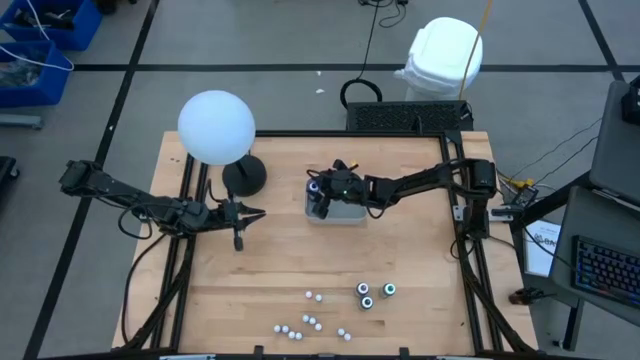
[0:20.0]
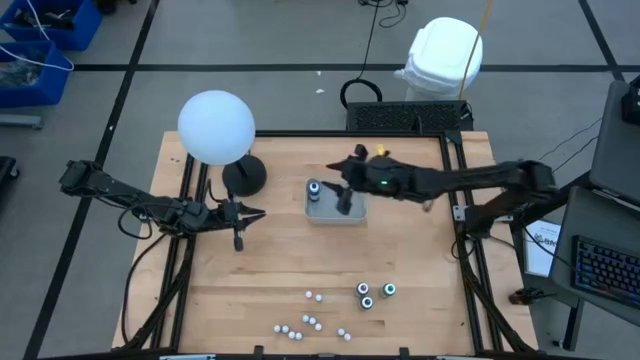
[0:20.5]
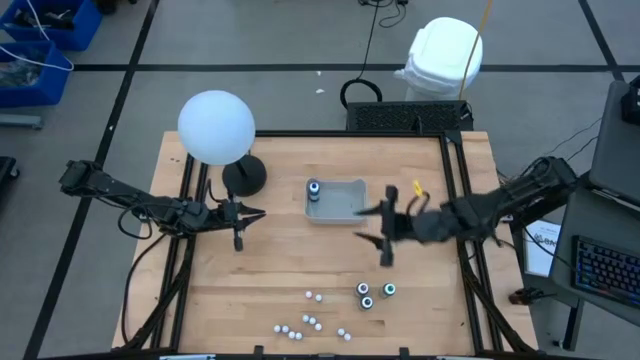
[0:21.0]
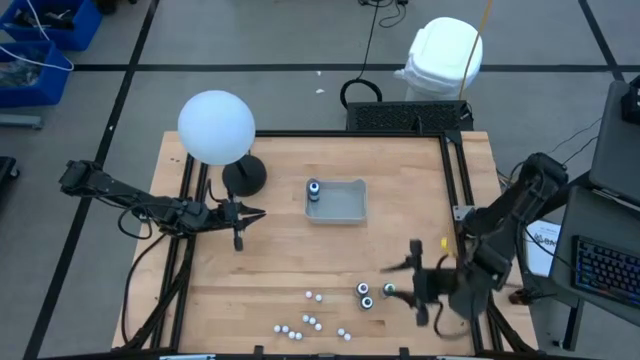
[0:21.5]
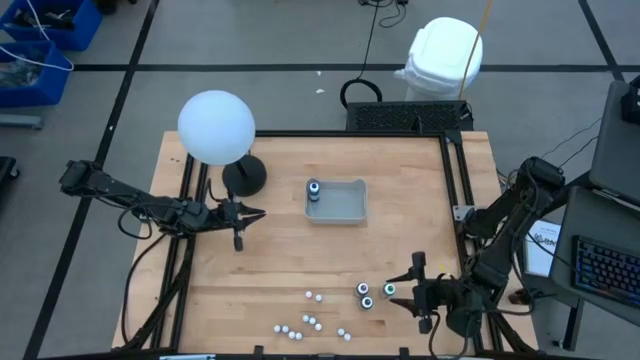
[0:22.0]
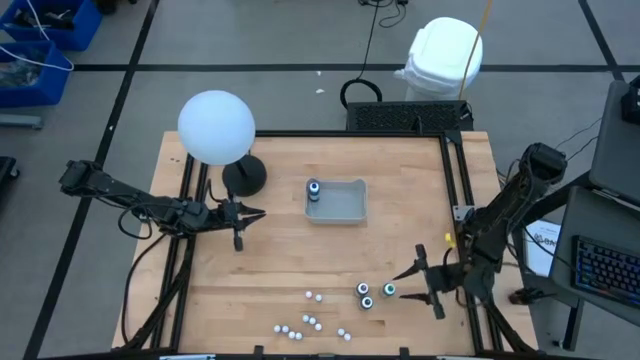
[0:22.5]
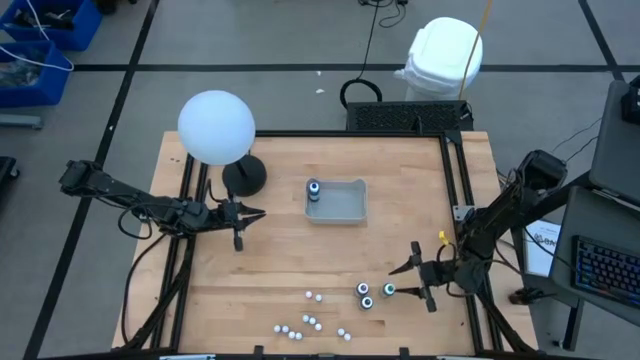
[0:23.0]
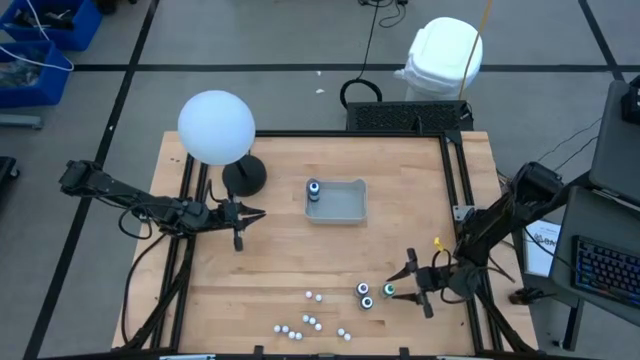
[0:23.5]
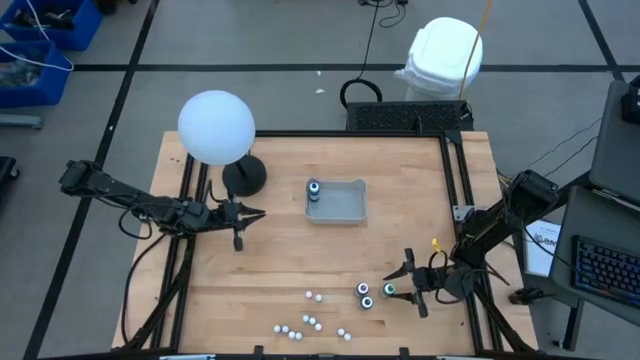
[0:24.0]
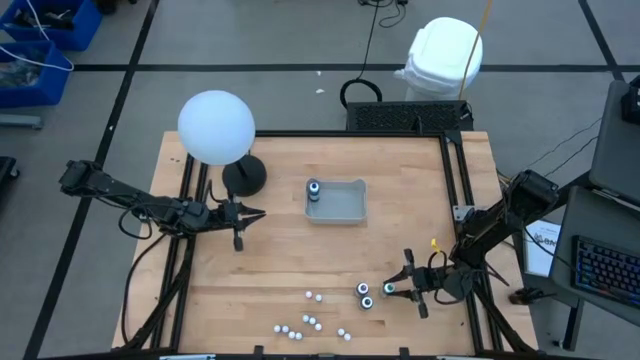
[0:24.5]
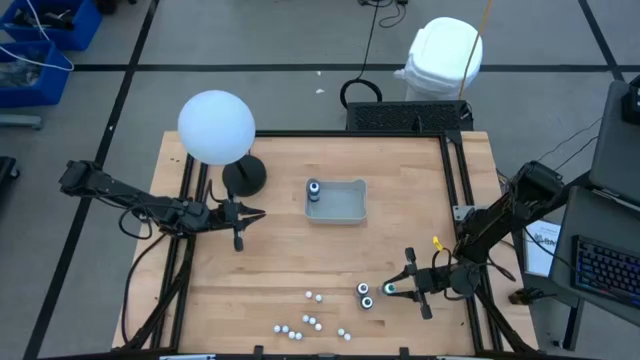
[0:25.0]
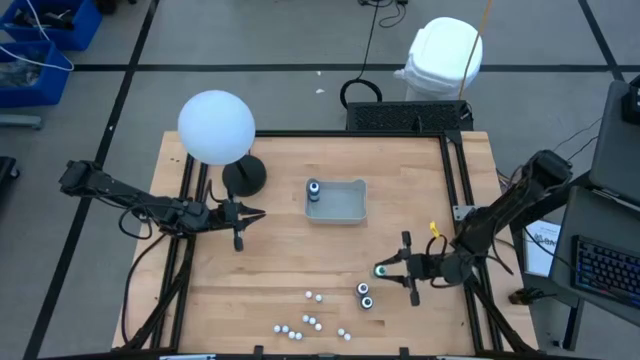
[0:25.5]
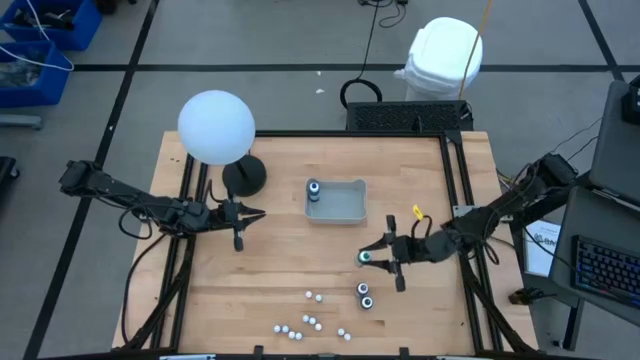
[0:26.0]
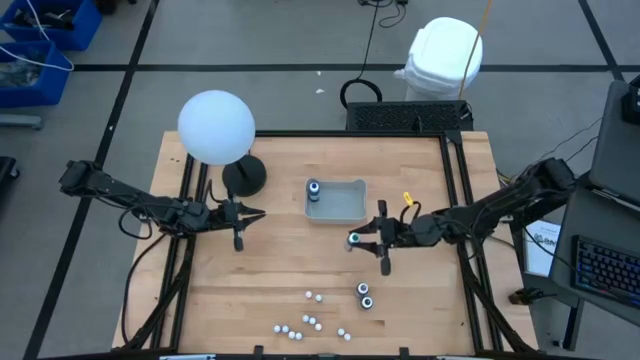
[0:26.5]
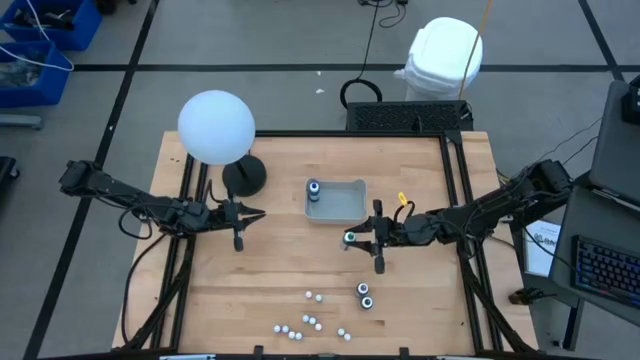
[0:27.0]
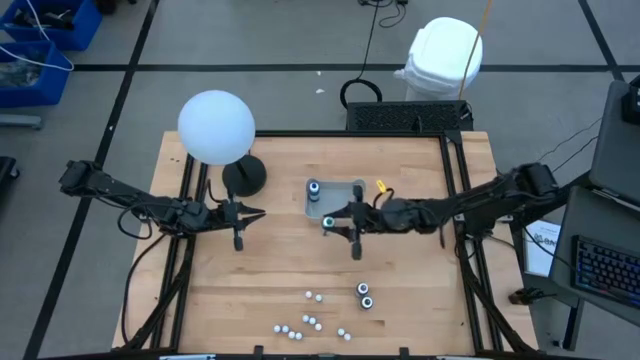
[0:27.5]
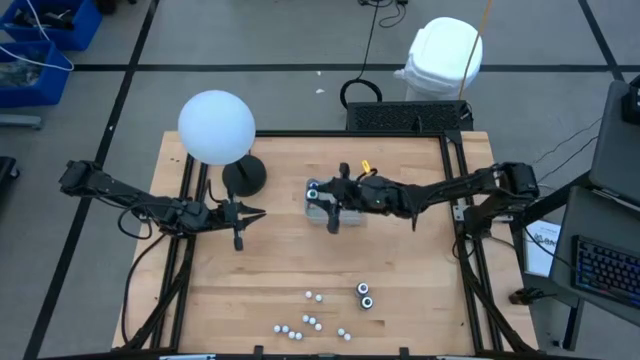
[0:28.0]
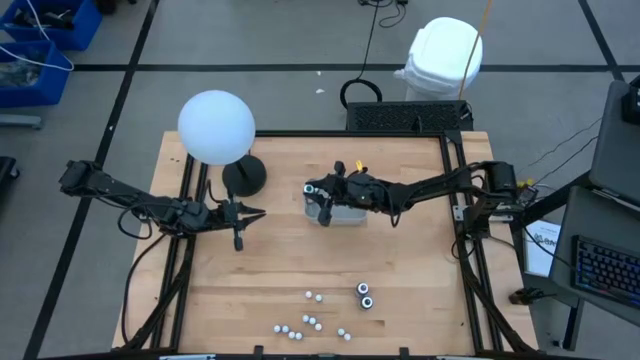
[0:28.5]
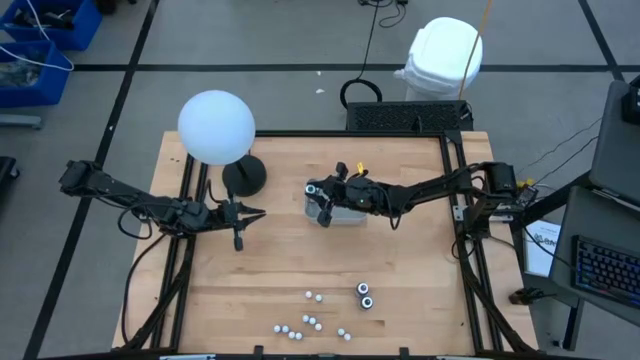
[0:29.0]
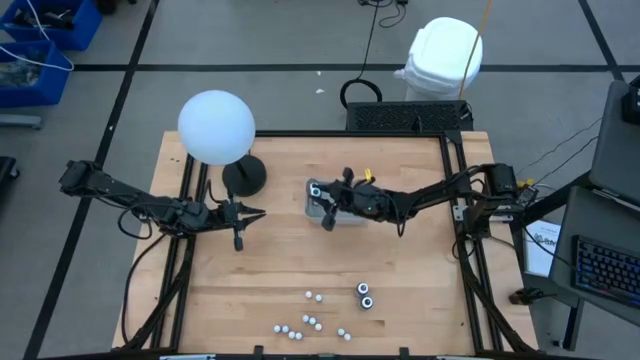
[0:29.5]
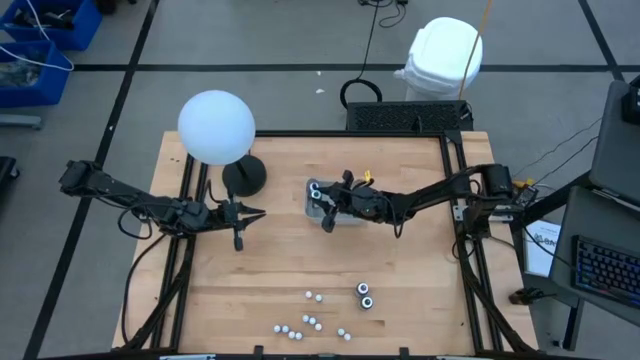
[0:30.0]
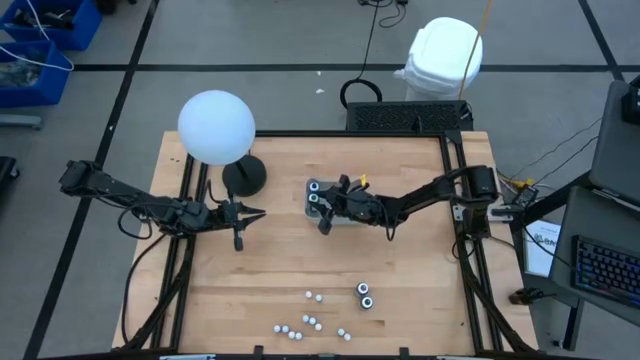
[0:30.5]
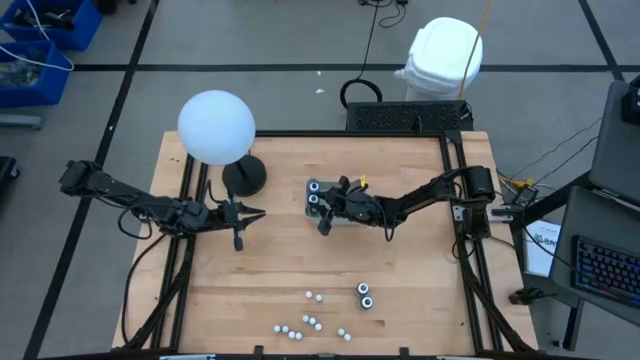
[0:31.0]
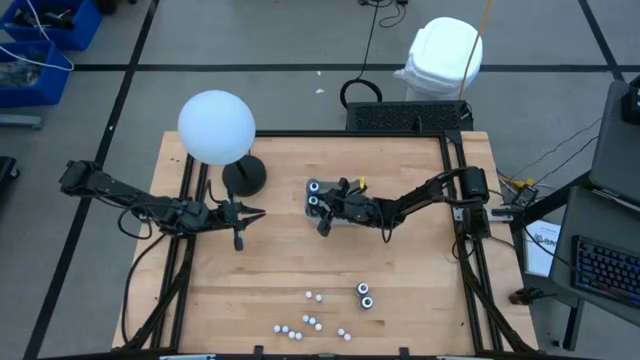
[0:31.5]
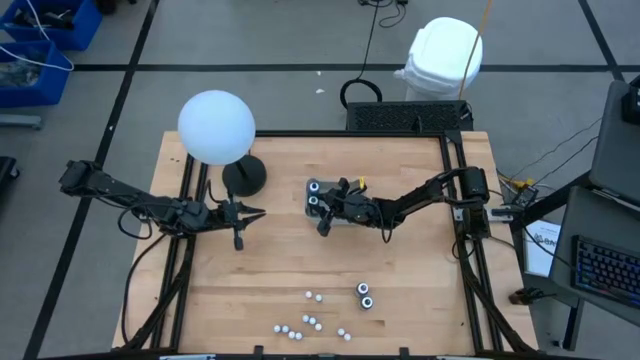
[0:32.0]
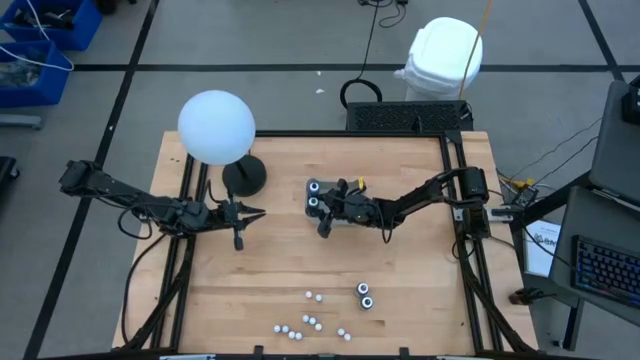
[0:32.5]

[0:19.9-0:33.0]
Task: Pick & Place food coloring
Put the big green food coloring bottle into the gray bin

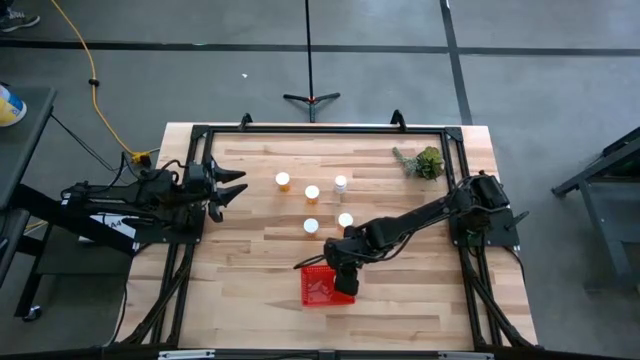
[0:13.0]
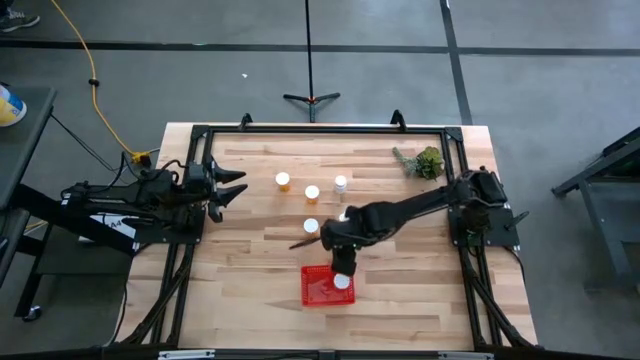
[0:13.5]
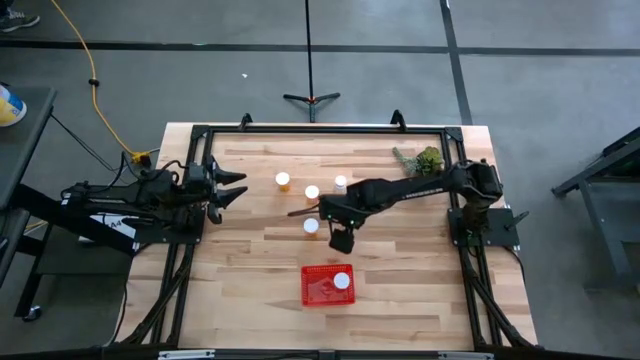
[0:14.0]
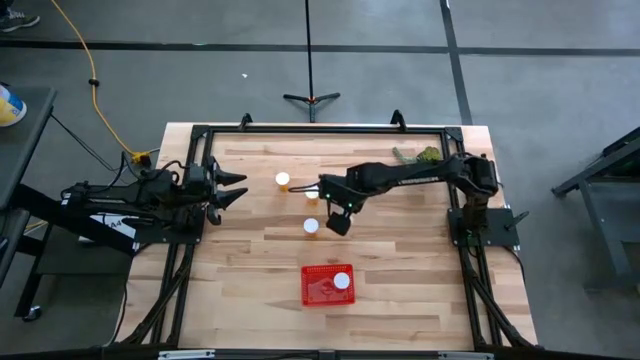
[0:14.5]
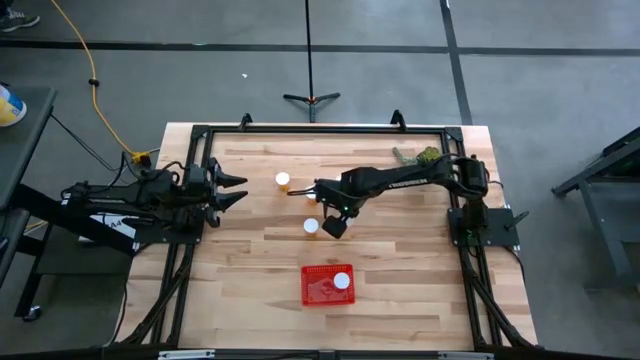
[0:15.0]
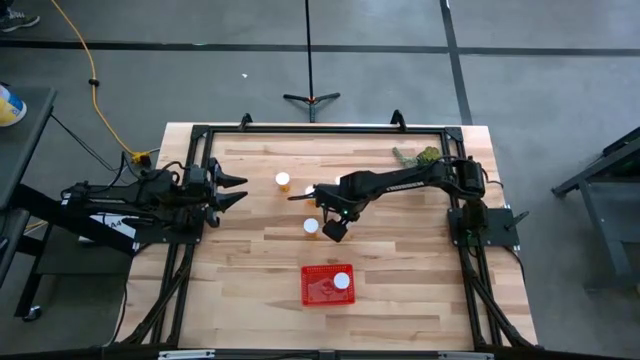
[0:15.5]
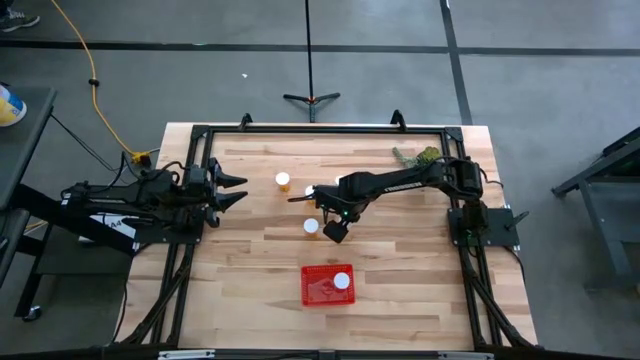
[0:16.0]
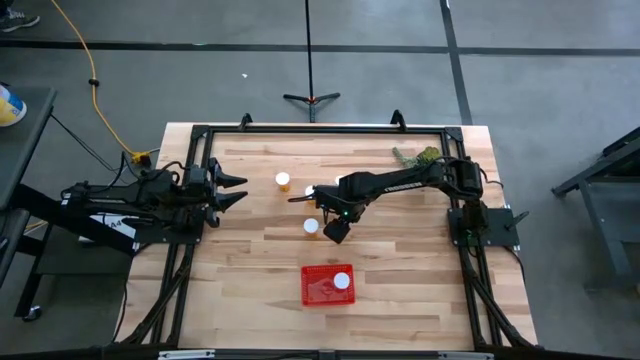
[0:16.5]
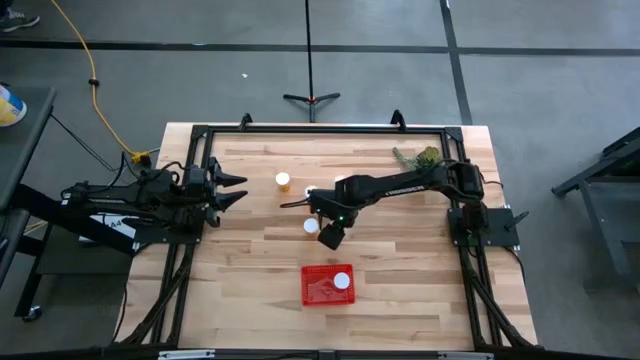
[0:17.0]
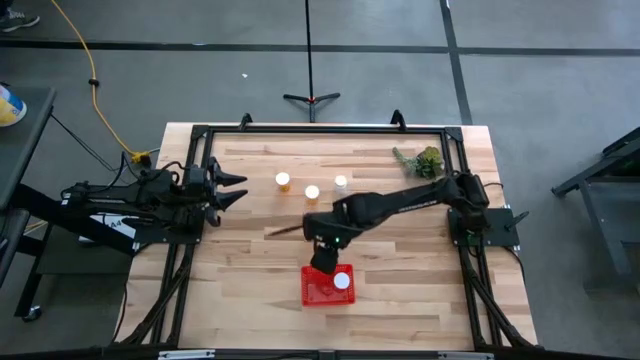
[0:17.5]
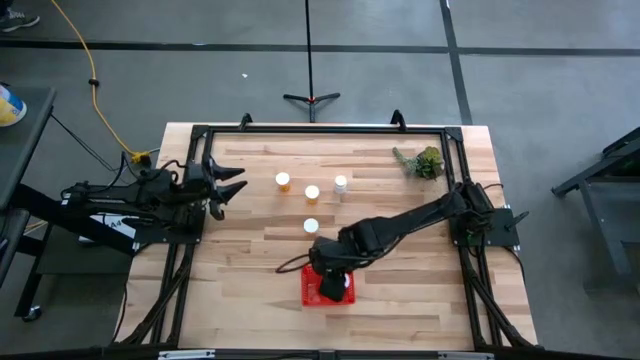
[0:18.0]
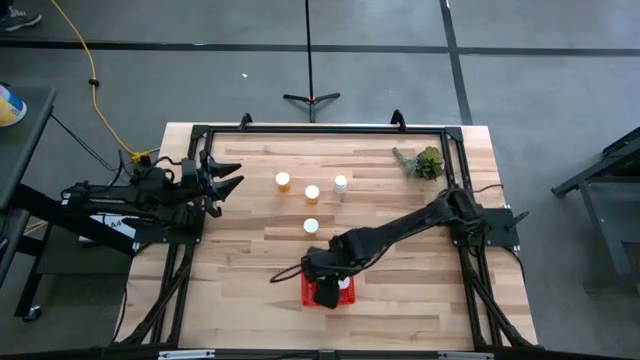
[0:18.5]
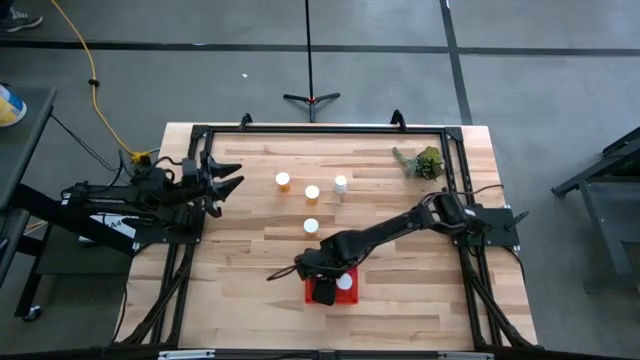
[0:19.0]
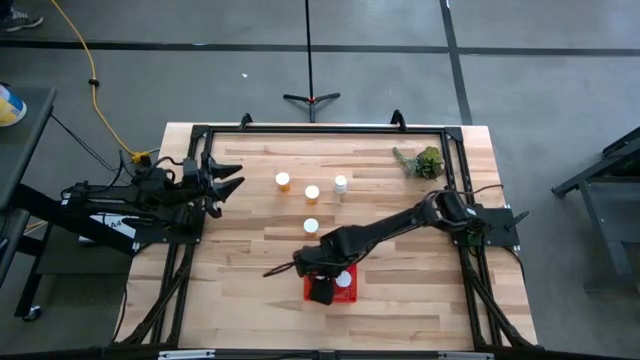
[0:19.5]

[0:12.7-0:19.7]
Task: Pick and place pill bottles into a basket
Put the orange pill bottle into the red basket

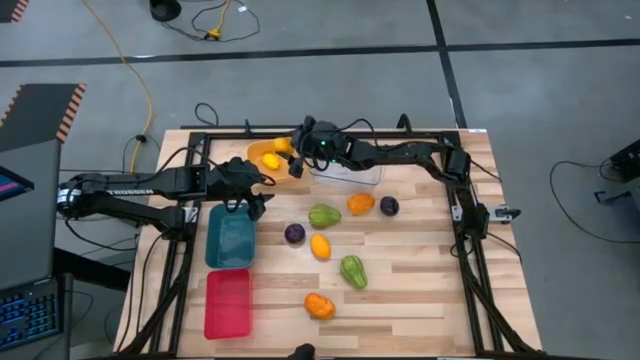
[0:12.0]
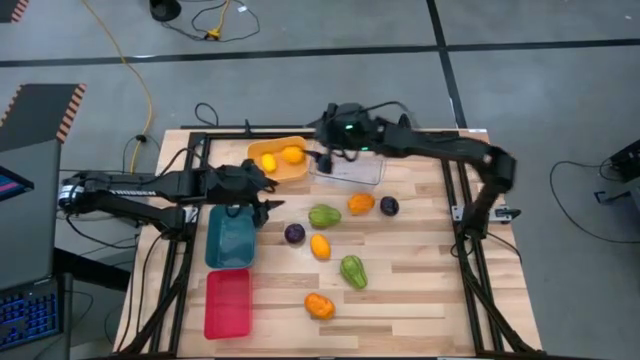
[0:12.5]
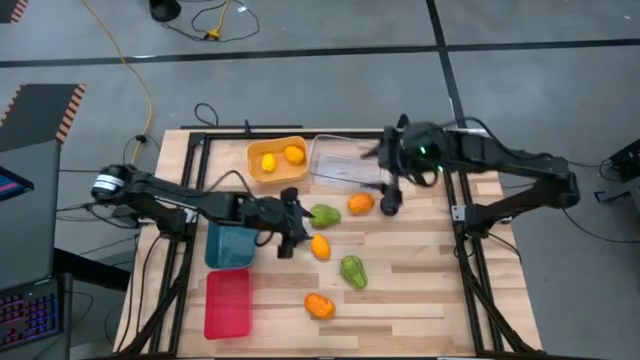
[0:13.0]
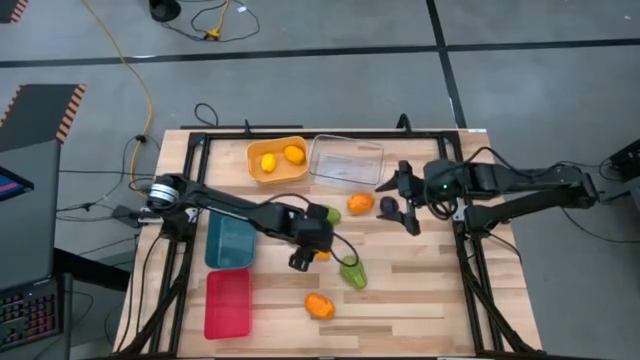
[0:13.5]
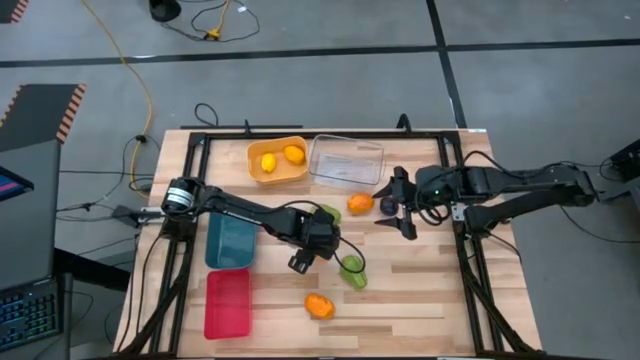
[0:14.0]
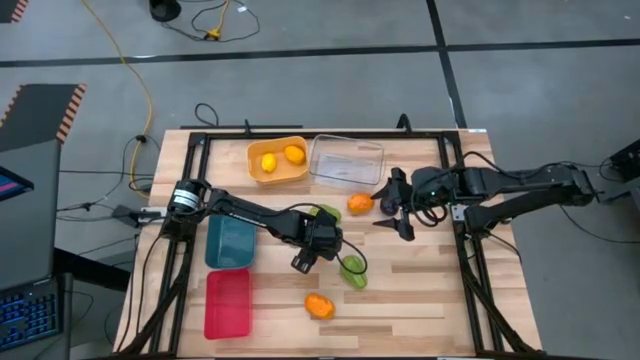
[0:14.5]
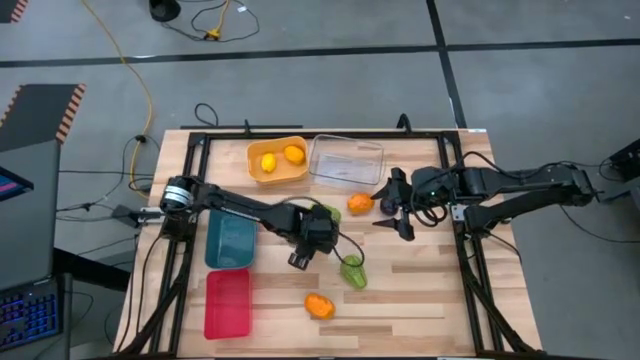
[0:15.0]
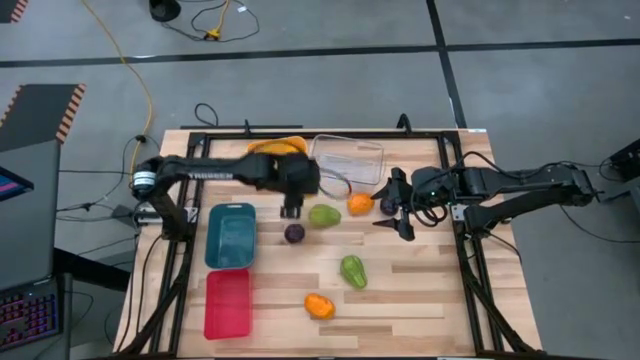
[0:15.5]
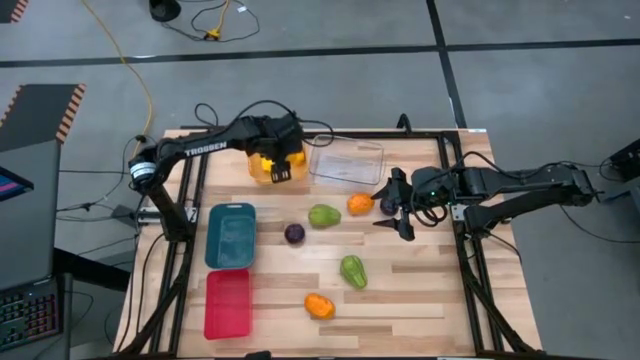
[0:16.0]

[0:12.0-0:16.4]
Task: Sort produce into baskets
Put the yellow lemon into the yellow bin
